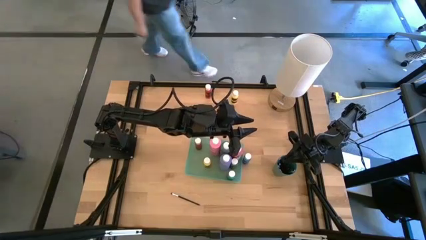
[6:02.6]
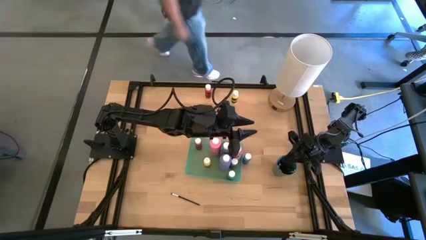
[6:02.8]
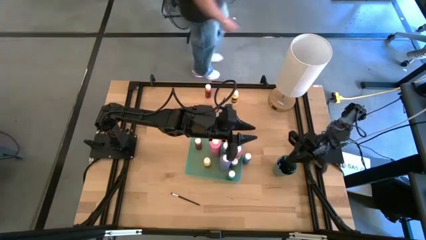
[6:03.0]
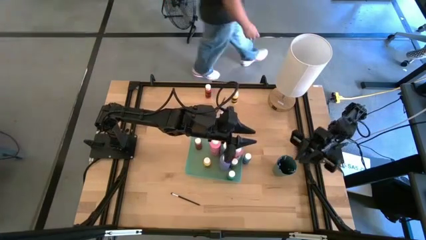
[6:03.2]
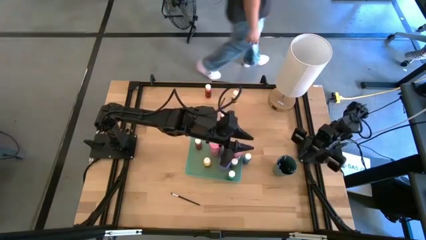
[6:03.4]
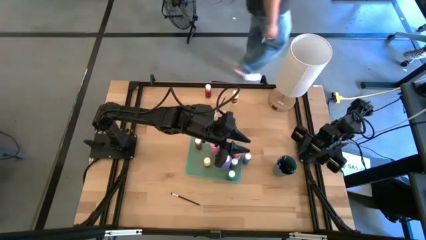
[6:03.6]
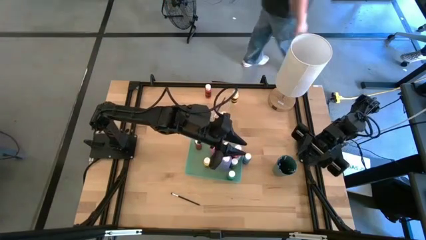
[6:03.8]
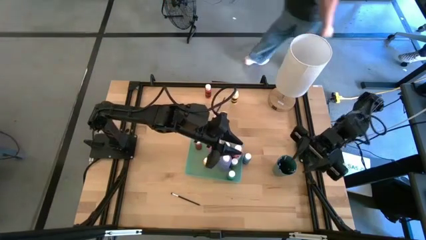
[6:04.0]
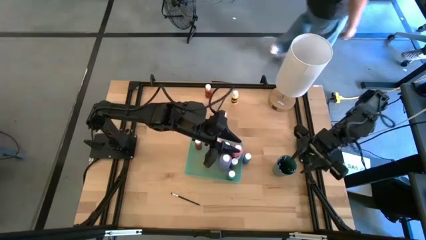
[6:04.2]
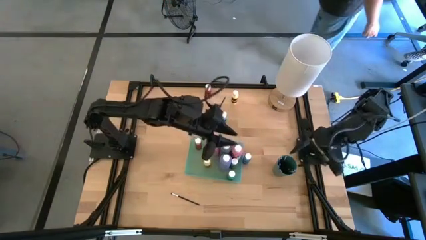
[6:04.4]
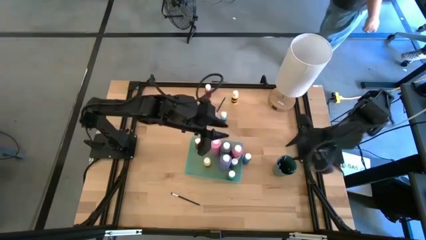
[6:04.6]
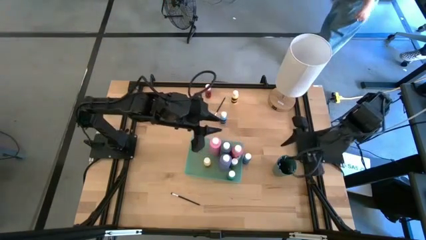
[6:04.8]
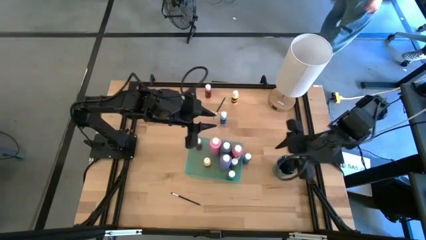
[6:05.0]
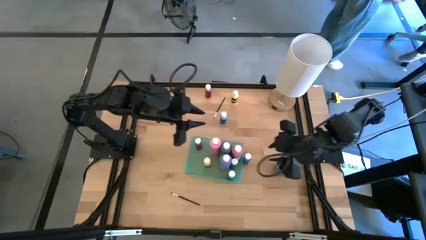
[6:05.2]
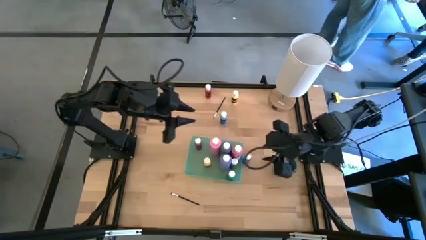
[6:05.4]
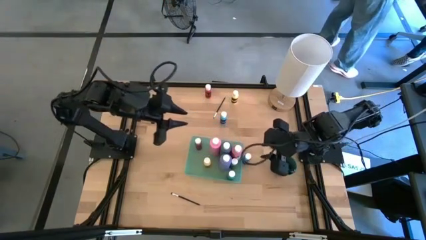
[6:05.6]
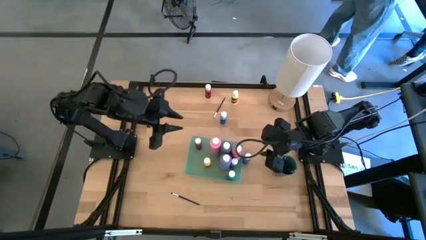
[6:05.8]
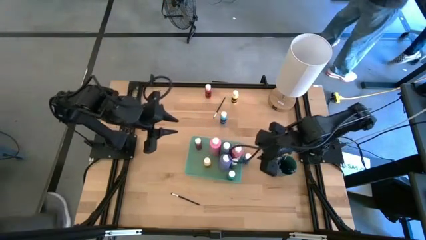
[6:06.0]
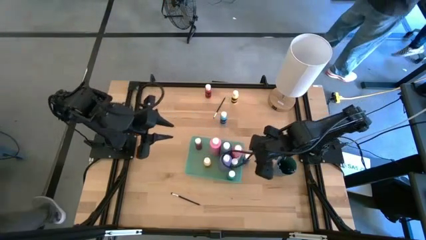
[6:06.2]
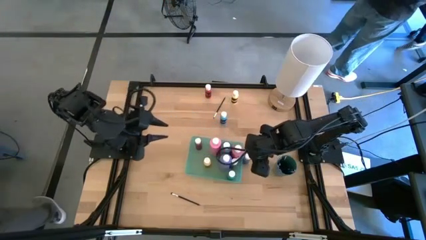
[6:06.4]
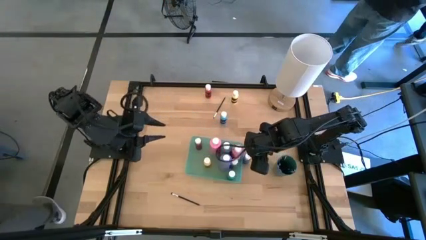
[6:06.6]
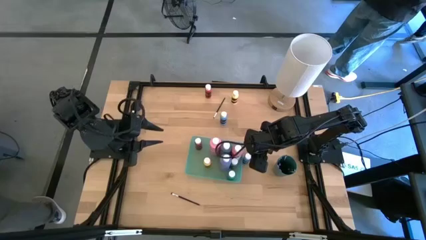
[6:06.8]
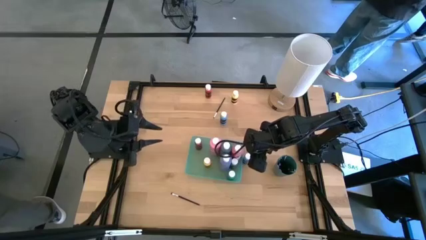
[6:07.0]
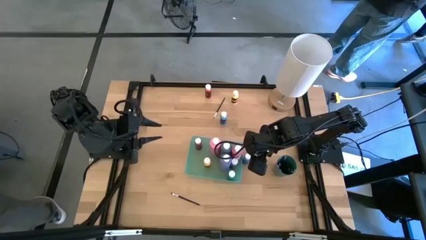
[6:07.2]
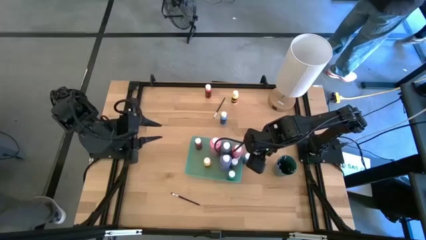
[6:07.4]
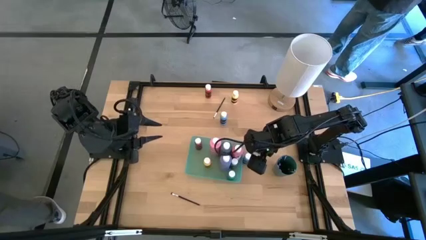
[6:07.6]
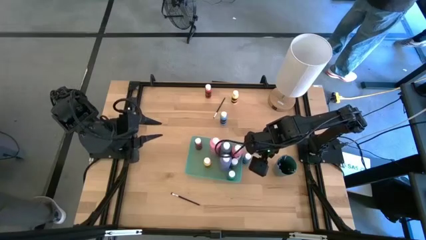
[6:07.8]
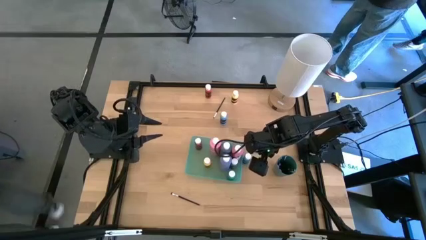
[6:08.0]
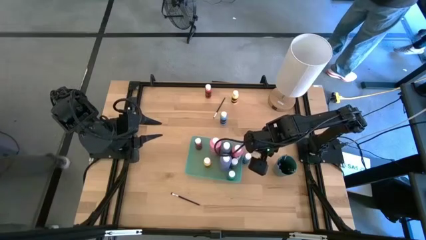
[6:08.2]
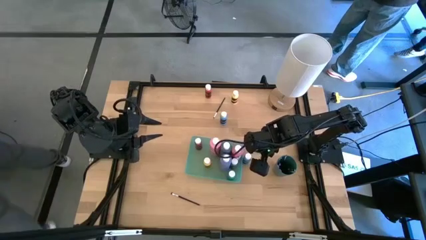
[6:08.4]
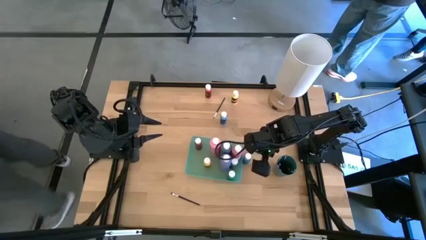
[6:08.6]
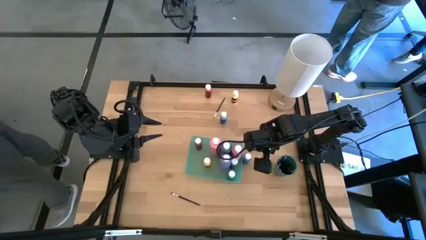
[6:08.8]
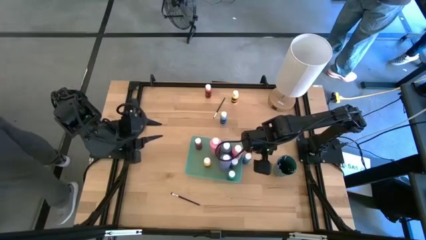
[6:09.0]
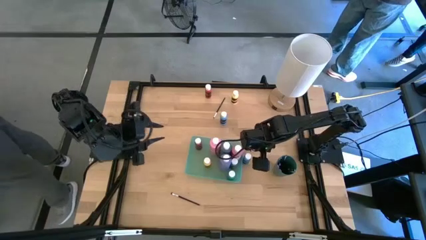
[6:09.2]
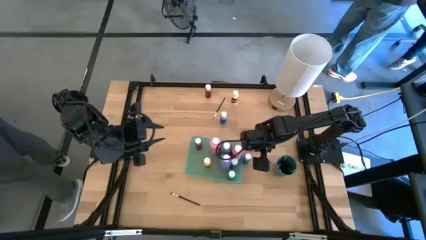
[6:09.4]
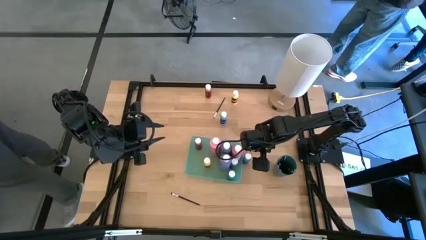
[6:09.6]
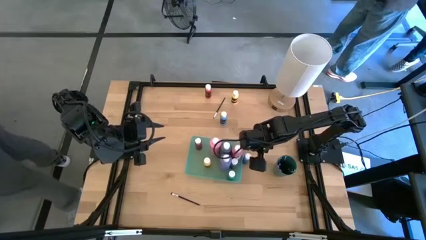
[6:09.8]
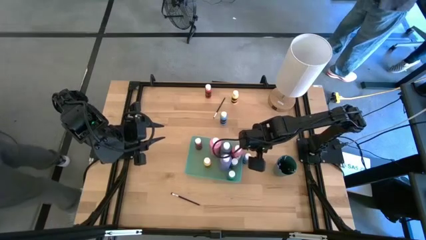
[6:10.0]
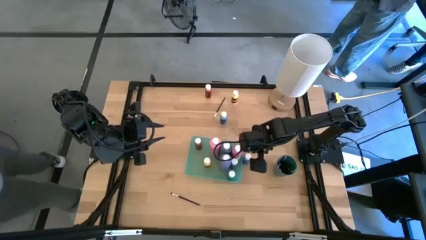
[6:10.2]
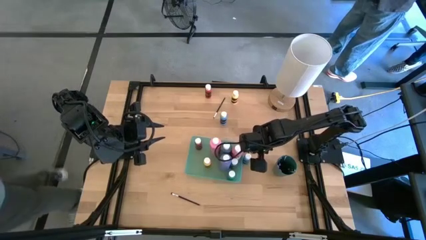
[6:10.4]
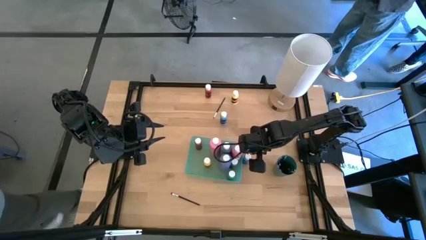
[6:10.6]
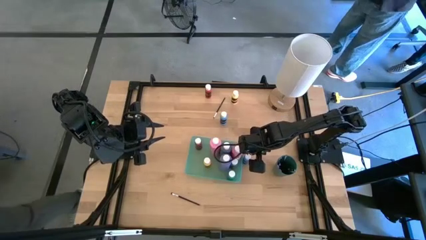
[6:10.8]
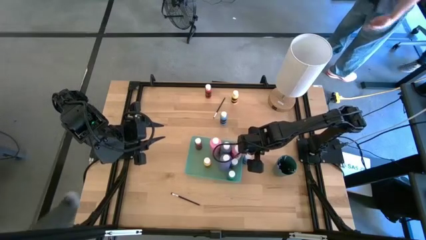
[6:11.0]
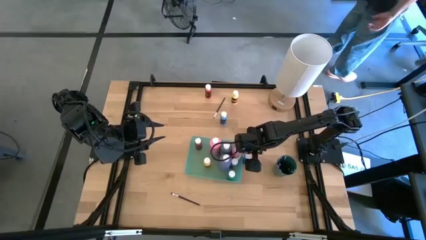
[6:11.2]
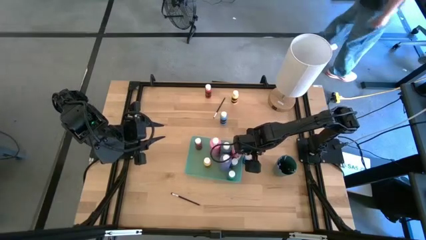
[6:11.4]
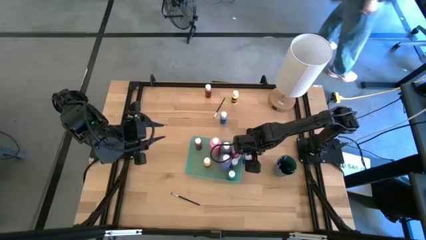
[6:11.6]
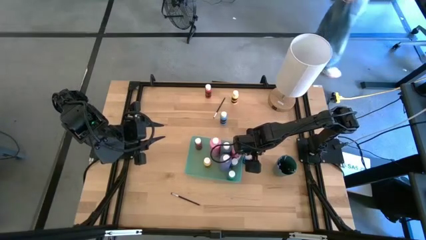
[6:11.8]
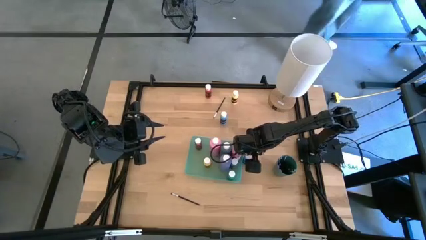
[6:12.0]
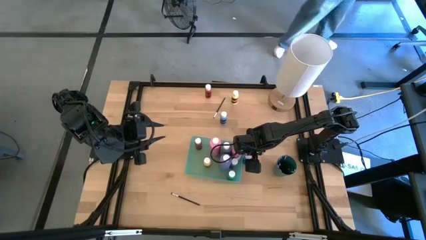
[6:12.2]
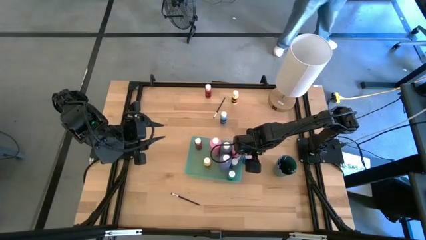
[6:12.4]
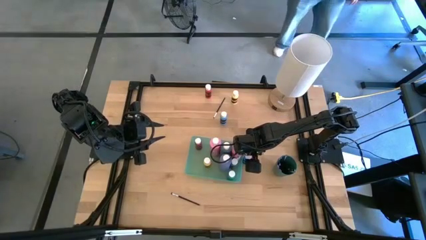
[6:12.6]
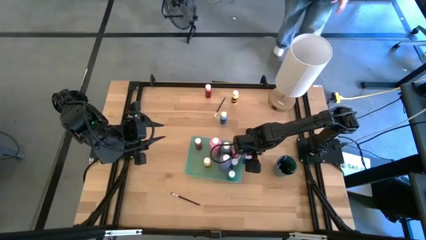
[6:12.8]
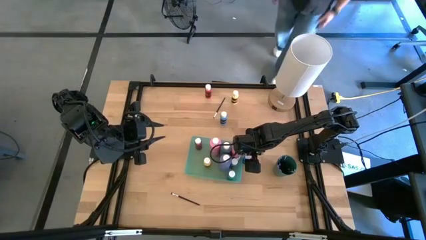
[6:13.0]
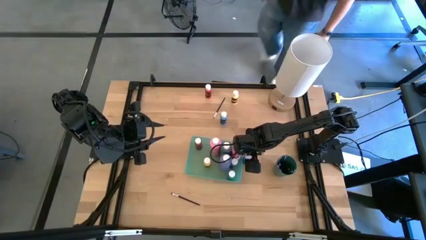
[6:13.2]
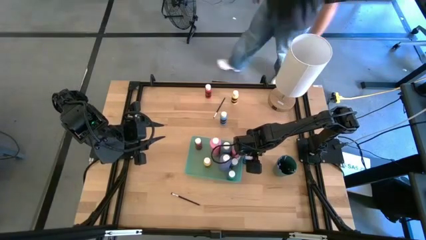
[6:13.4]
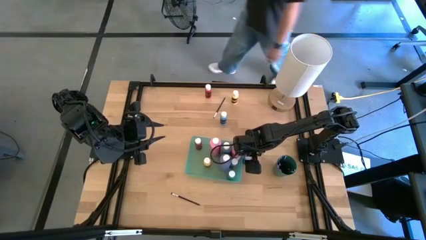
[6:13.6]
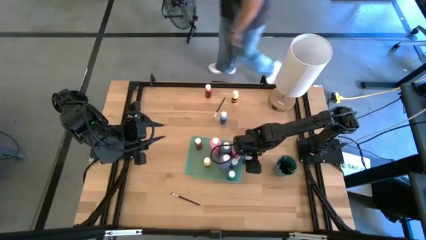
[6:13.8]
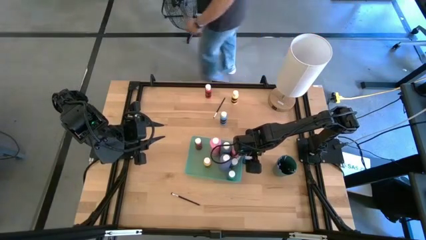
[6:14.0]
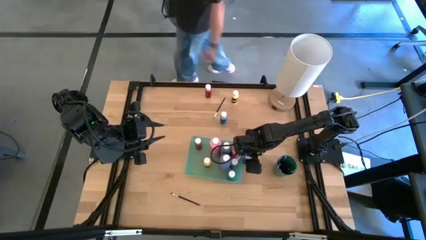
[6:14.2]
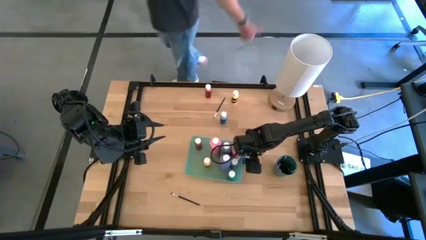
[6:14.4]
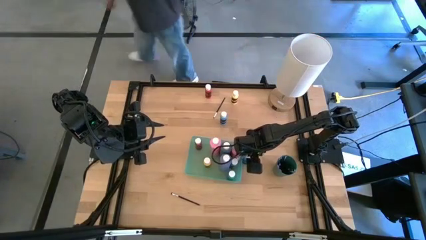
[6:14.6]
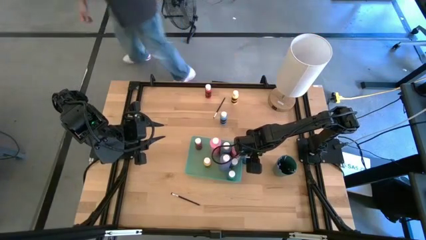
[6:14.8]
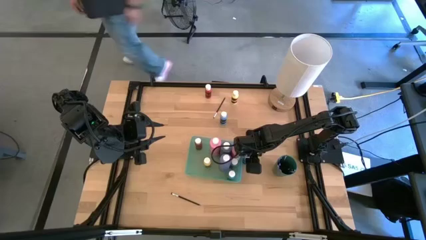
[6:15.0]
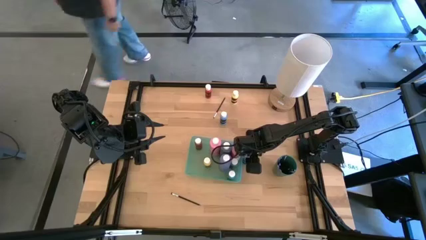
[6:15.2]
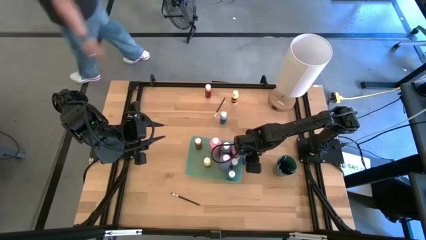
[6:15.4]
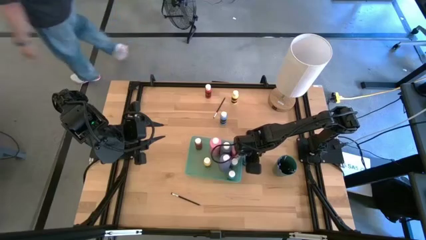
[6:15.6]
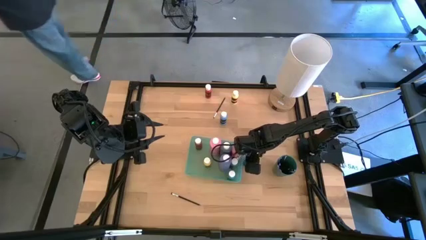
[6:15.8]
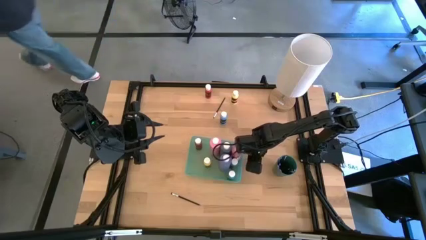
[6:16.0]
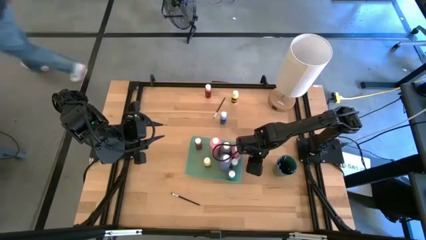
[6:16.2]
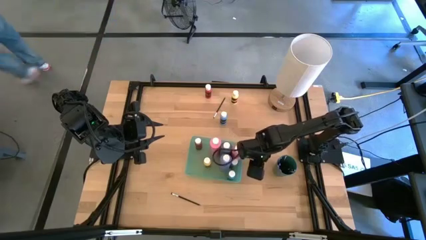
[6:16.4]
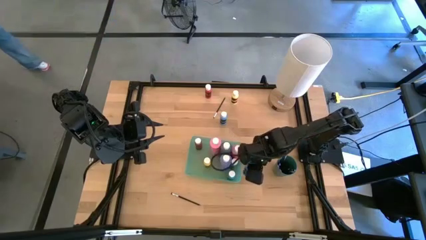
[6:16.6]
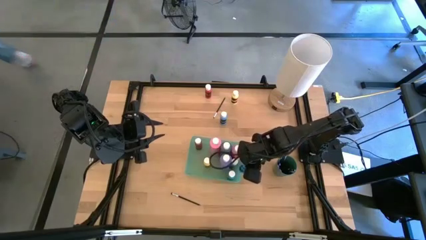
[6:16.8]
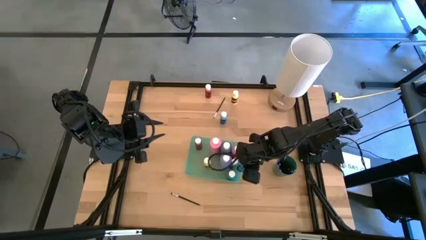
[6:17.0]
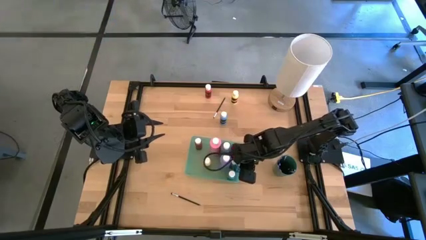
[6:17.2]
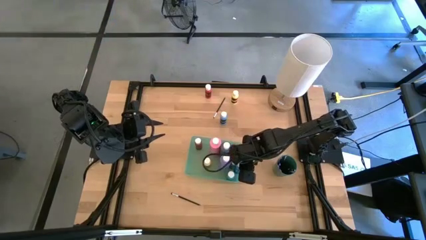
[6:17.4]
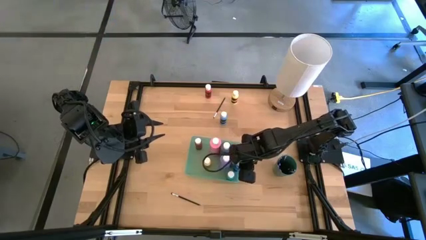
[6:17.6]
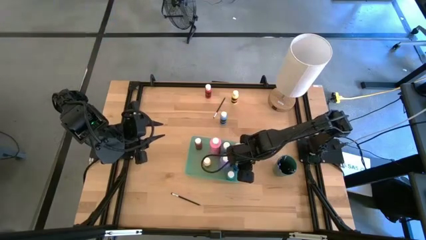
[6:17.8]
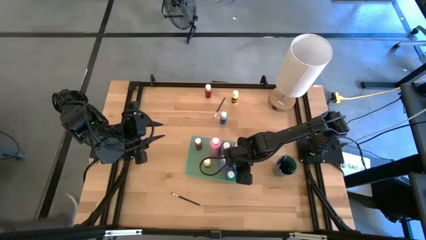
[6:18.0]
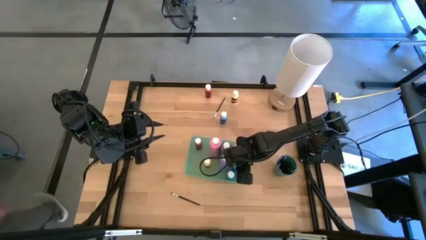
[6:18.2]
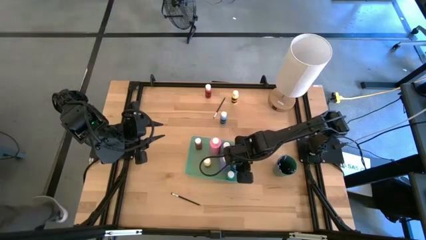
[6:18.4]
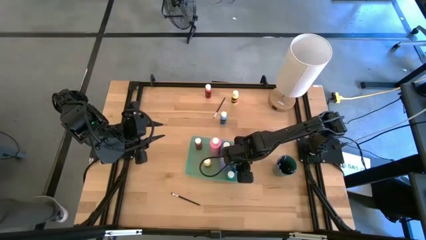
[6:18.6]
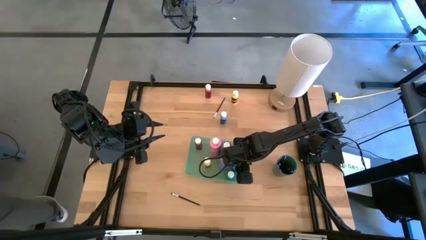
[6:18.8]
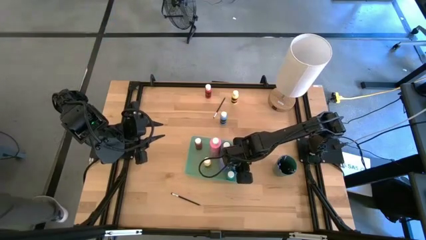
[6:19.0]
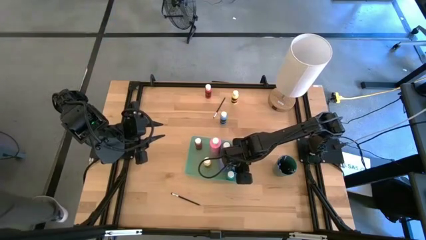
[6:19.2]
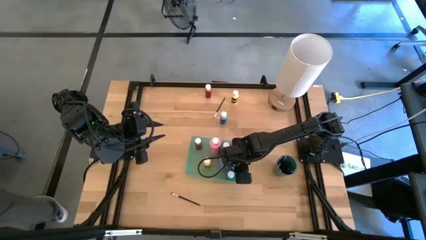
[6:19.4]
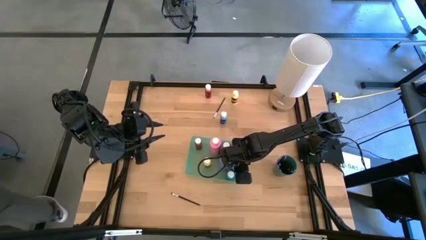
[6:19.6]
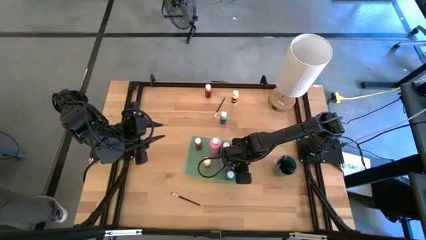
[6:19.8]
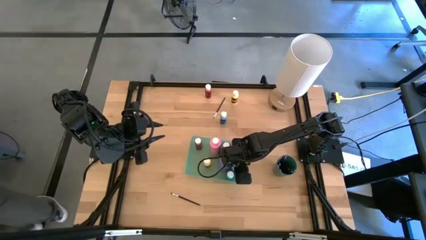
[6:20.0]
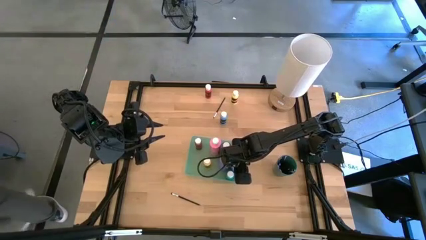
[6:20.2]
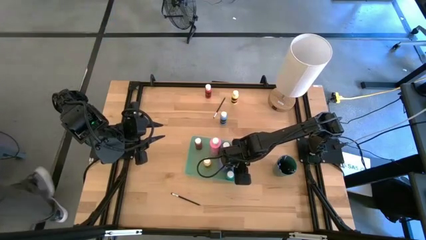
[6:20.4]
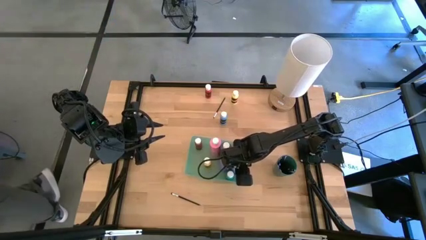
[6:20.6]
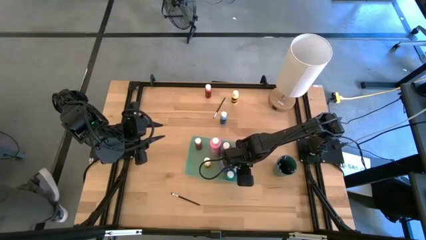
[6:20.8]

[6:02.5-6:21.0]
Task: Pick & Place Paint Supplies
Put the small blue paint bottle into the light green bin
